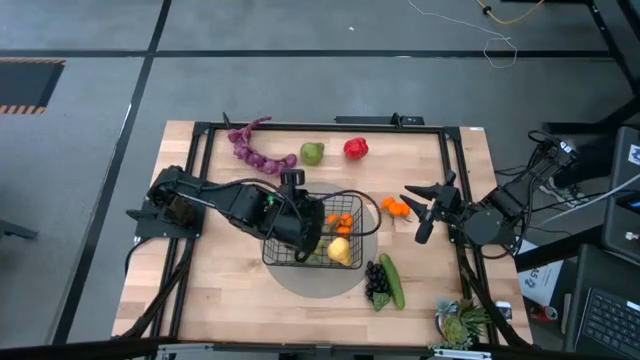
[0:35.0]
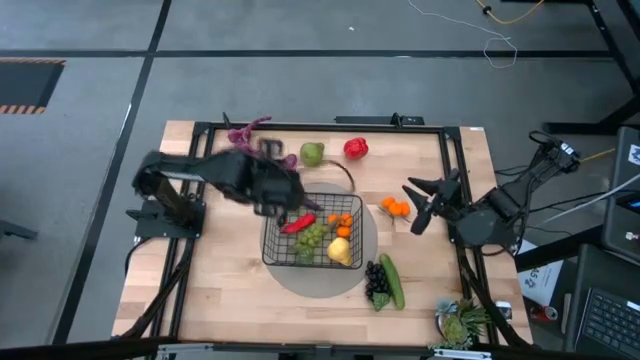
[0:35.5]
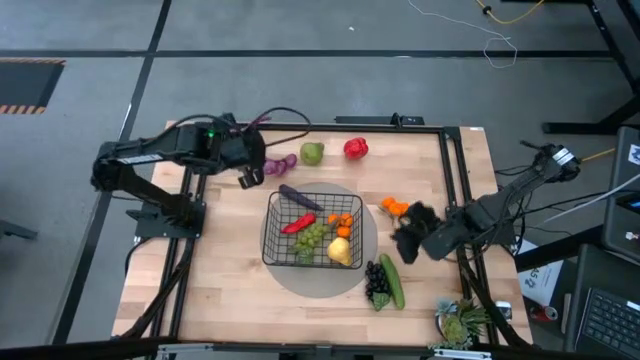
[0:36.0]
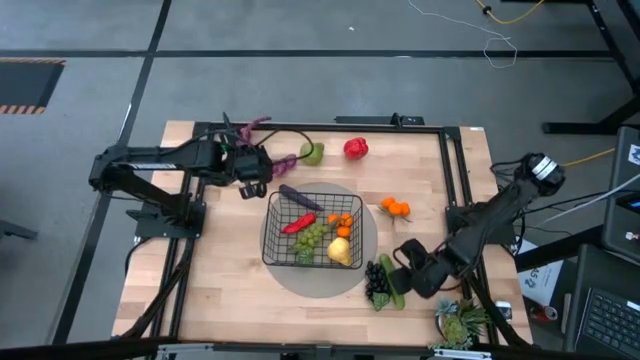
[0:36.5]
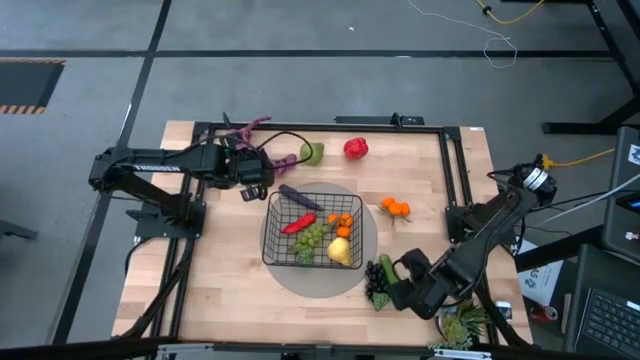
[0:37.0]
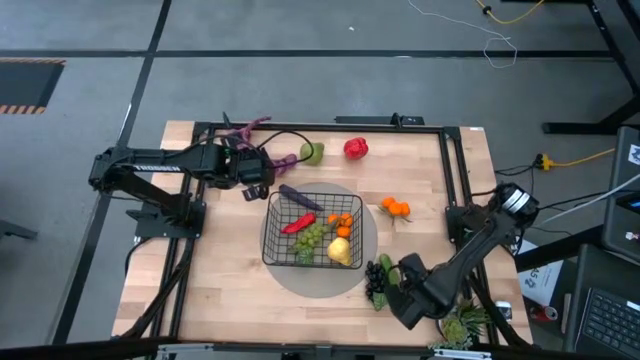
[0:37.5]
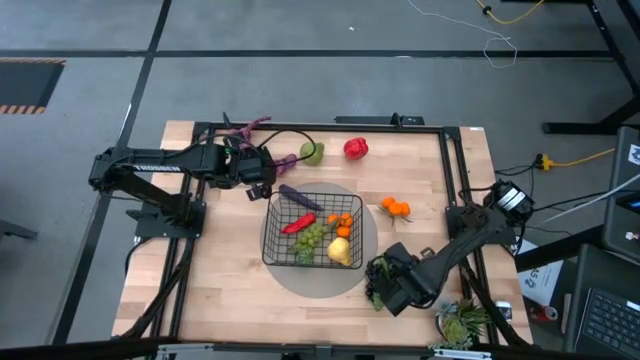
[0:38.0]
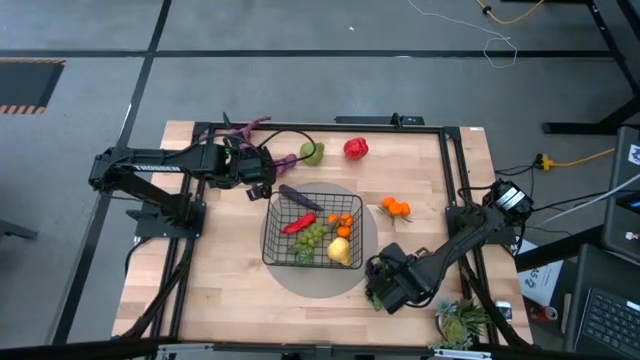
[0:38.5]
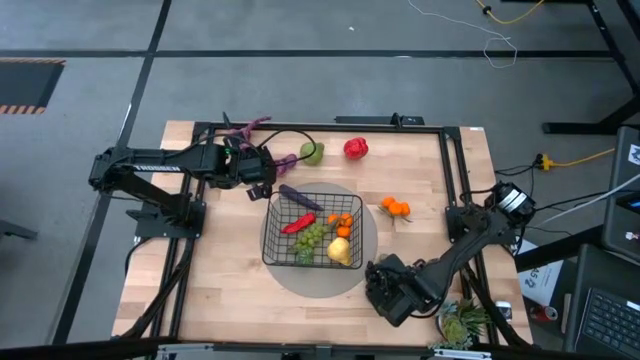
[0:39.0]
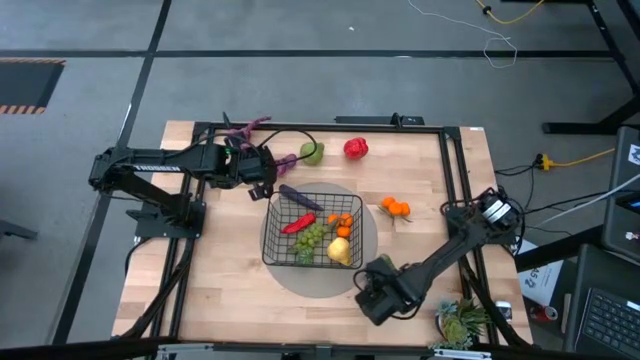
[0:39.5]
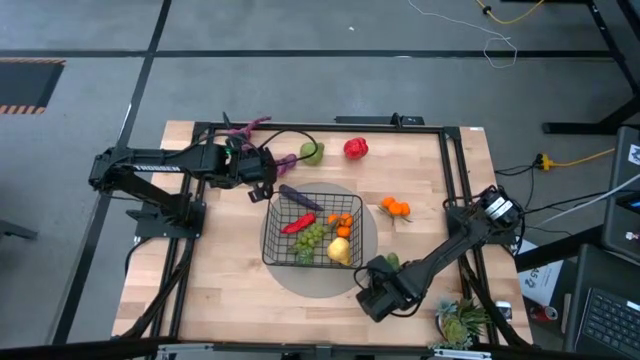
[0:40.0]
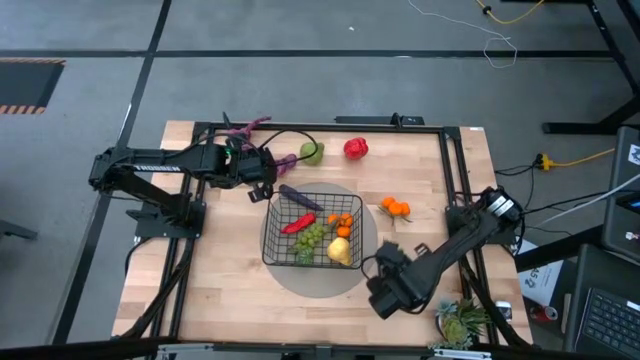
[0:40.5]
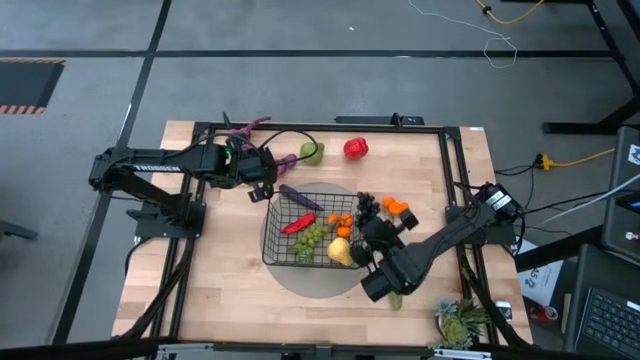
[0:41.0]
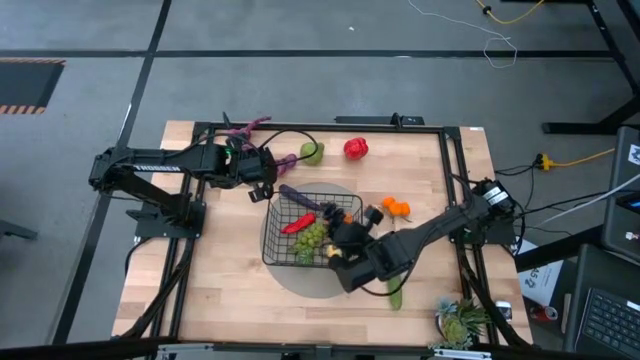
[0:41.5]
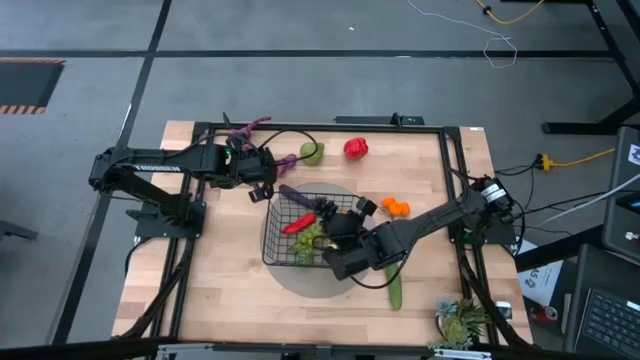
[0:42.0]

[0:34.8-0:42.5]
Task: Build produce basket
Put the black grapes into the black wire basket

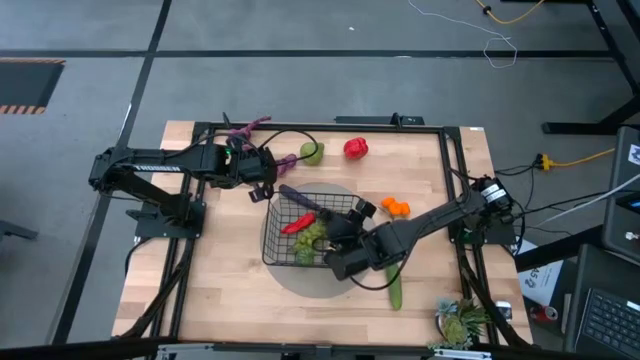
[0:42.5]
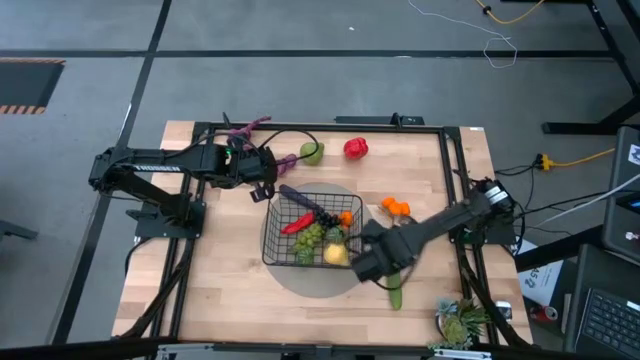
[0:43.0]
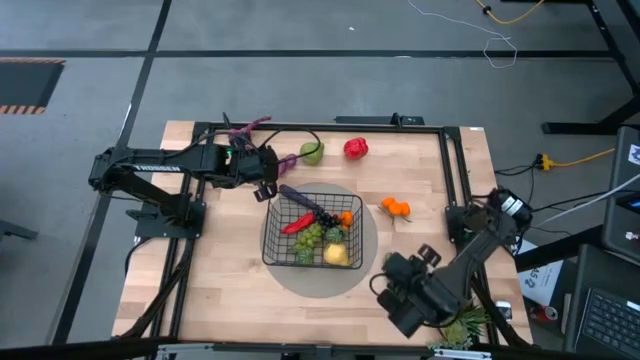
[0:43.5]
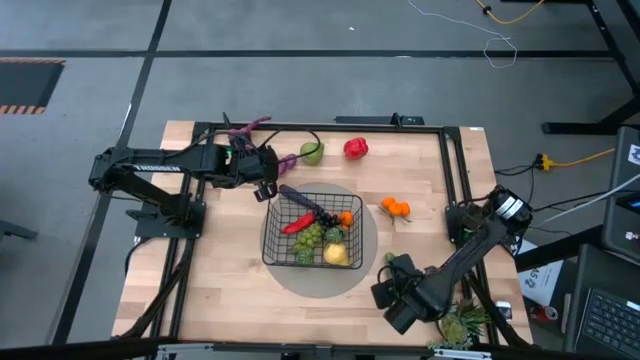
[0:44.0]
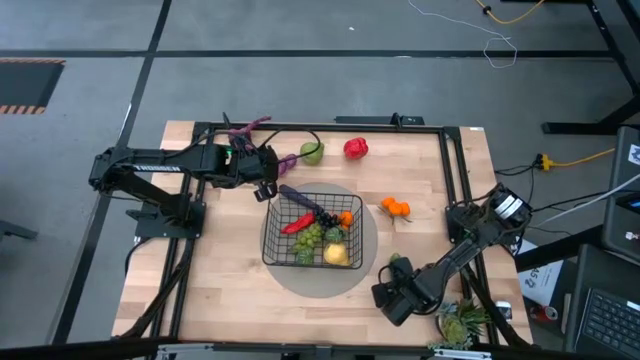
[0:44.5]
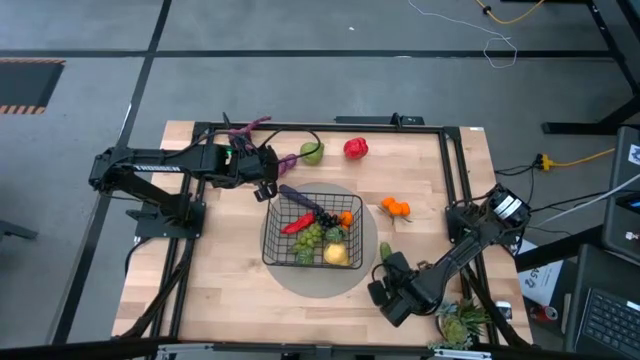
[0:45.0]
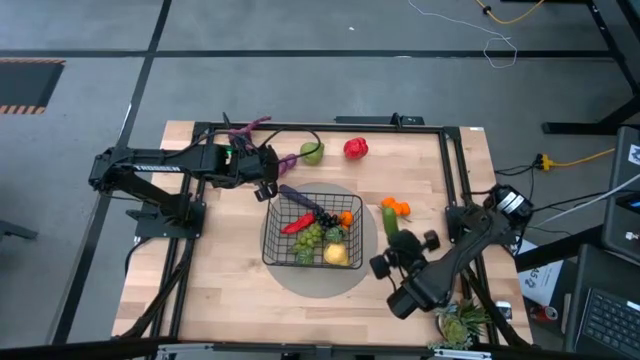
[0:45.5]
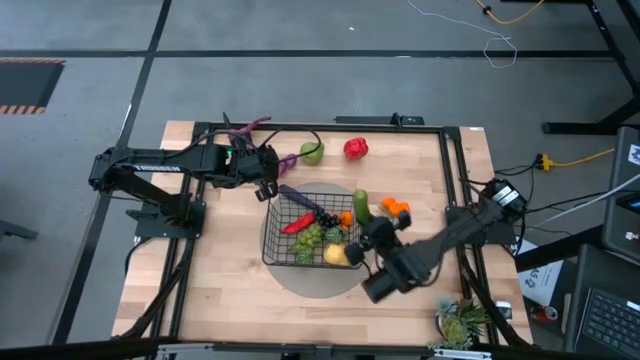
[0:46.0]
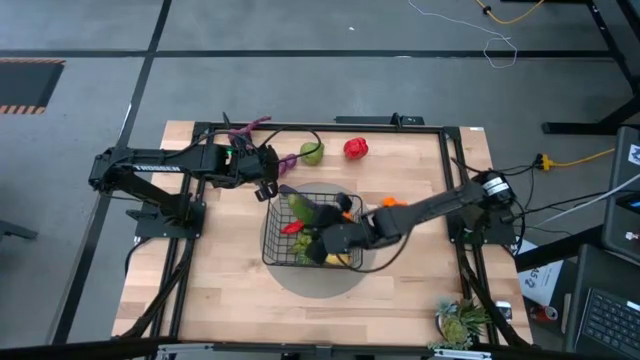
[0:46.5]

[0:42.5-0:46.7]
Put the green cucumber into the black wire basket

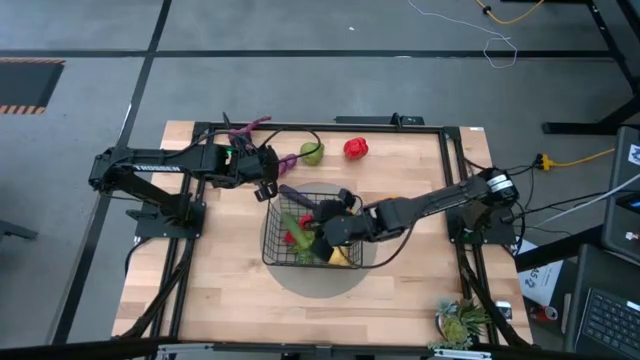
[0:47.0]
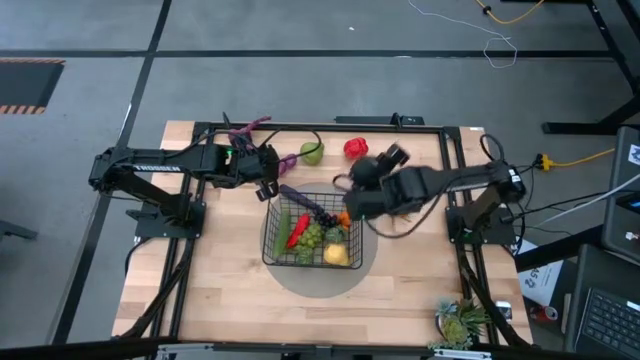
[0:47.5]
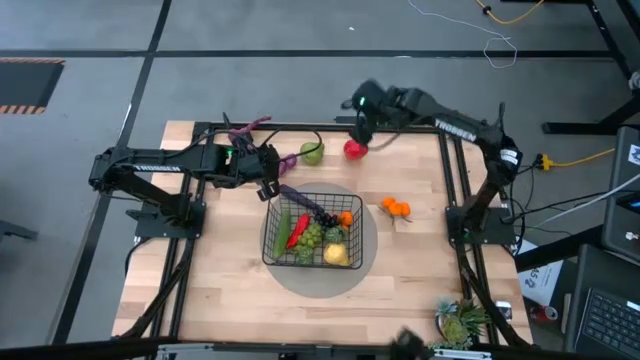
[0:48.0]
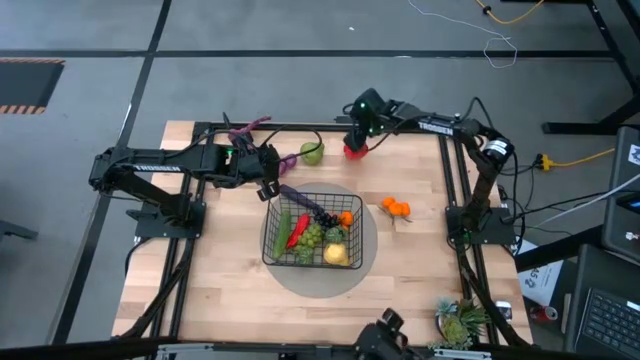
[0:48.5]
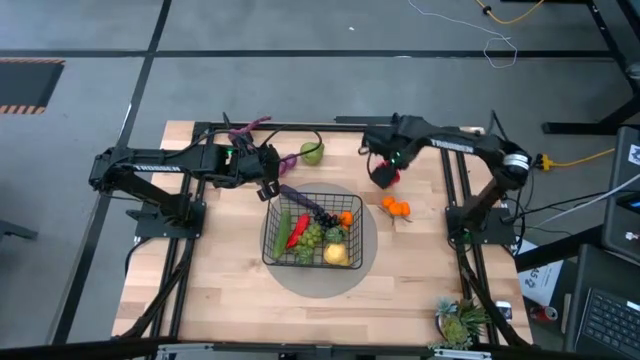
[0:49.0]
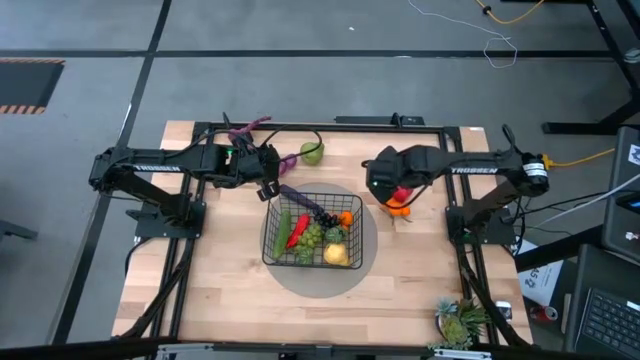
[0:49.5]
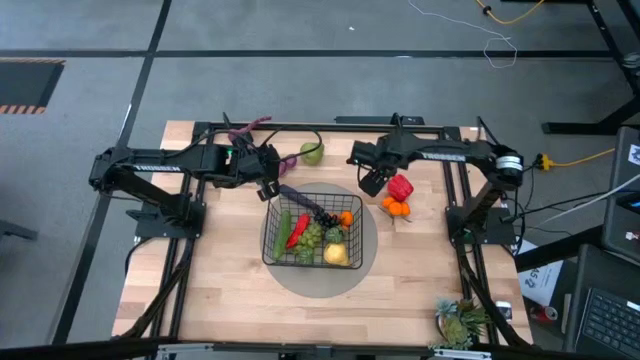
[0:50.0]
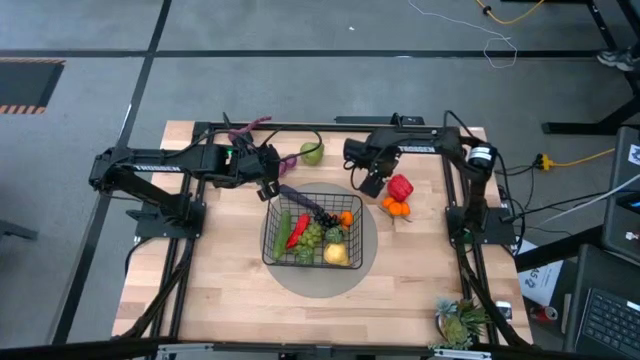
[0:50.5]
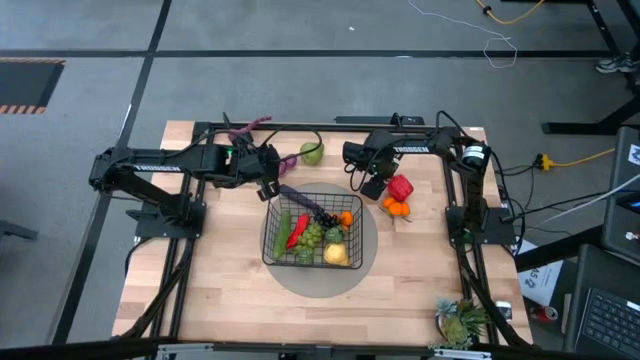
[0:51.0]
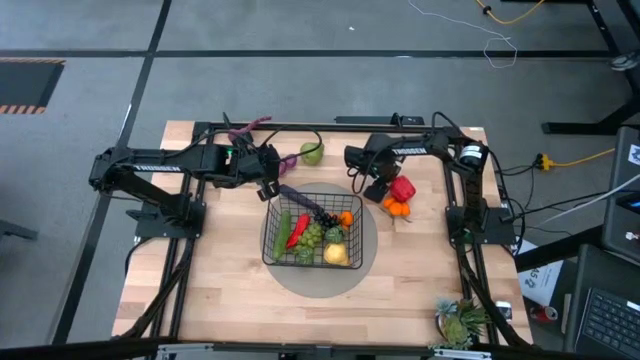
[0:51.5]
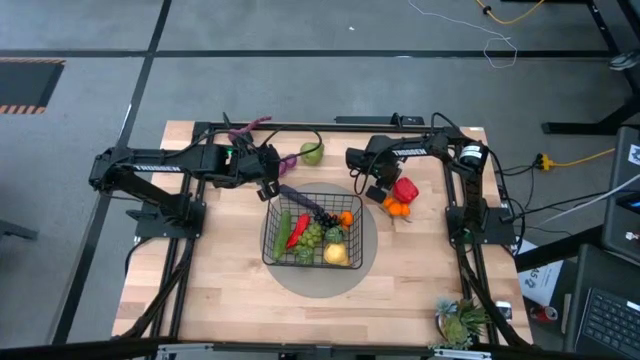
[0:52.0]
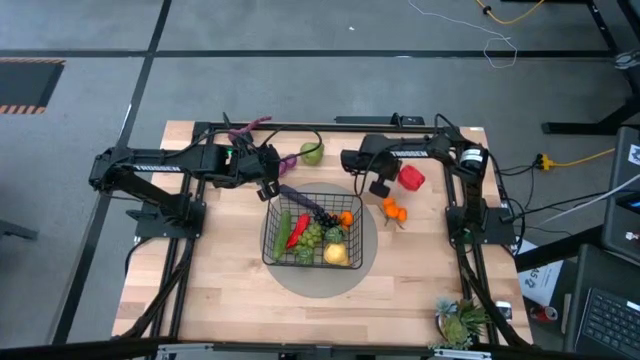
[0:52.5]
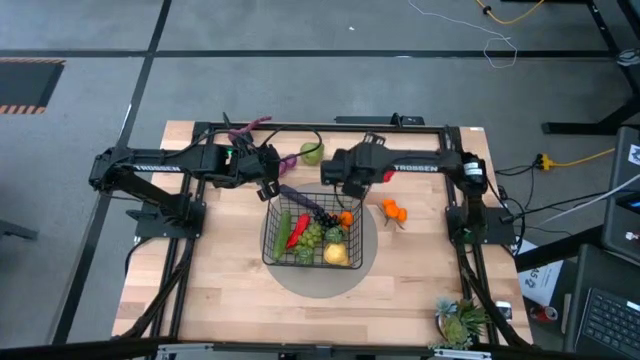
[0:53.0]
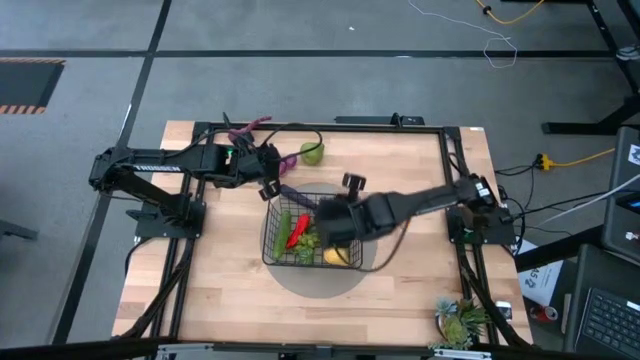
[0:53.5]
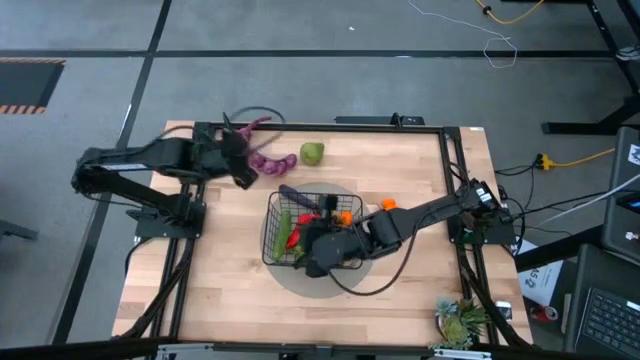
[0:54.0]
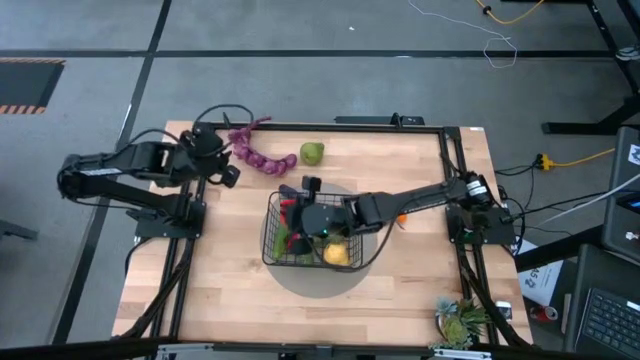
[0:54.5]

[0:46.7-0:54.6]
Put the red bell pepper into the black wire basket

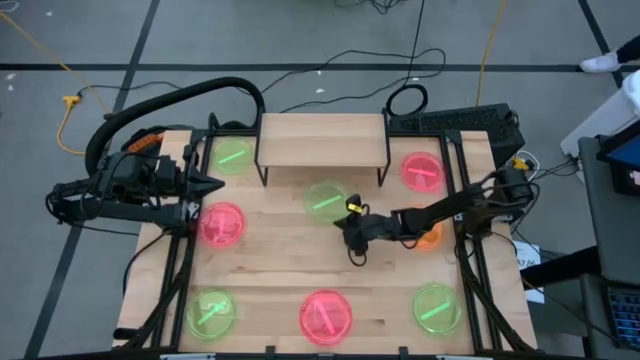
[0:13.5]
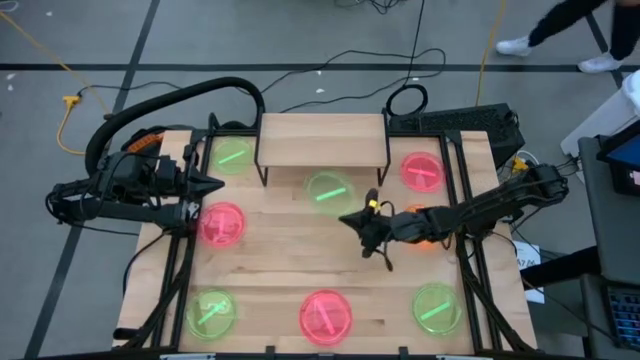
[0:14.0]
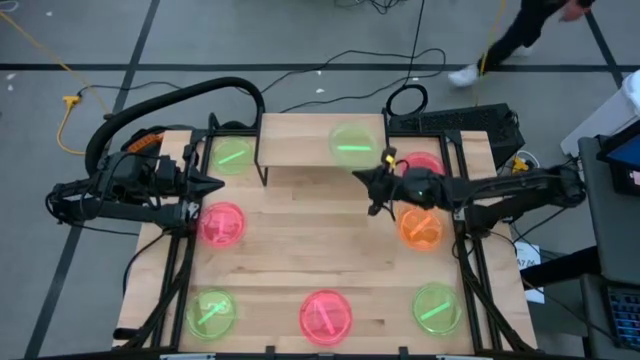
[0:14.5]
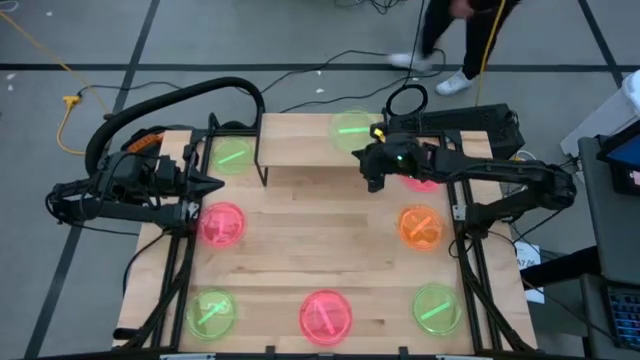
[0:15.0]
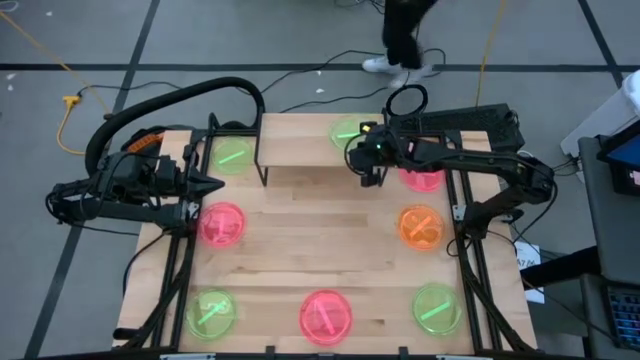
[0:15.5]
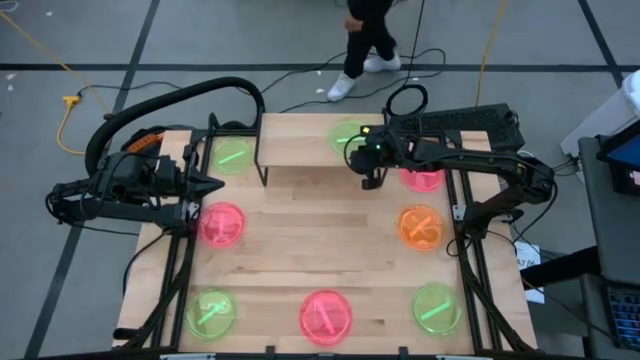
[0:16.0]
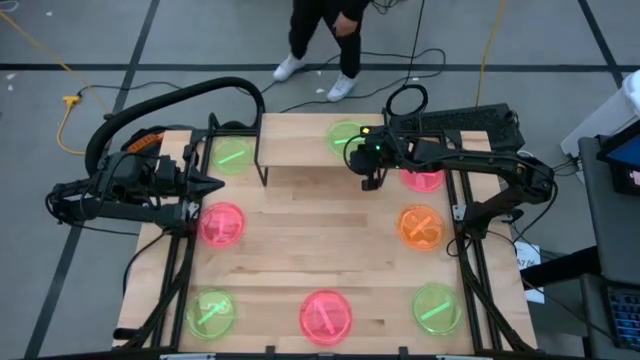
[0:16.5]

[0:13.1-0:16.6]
Task: Place and stack plates onto a shelf
Put the green plate on the shelf
